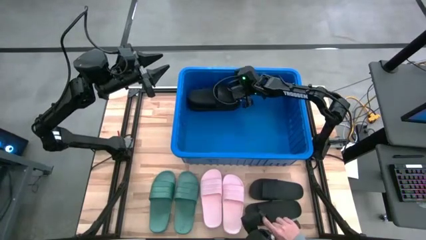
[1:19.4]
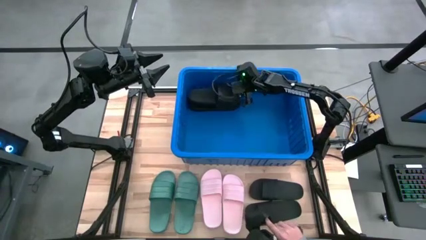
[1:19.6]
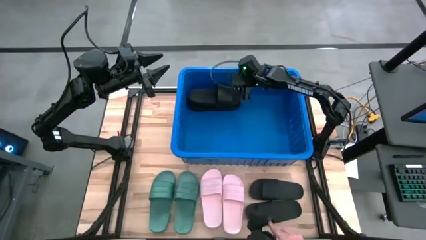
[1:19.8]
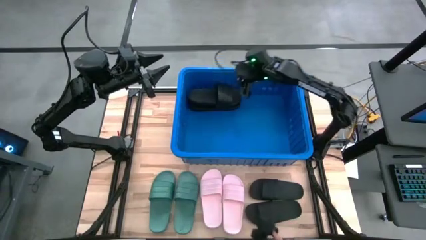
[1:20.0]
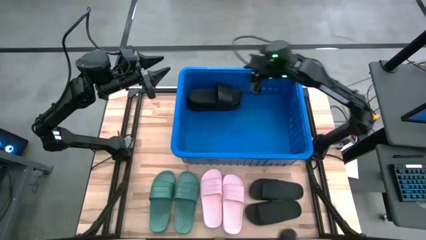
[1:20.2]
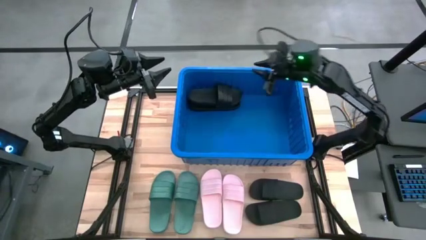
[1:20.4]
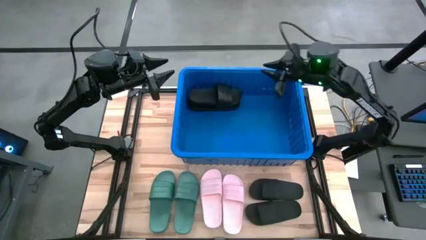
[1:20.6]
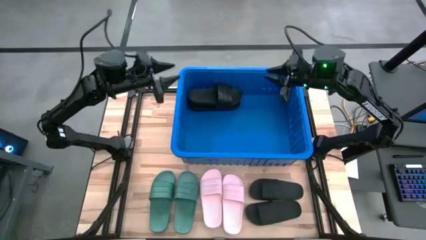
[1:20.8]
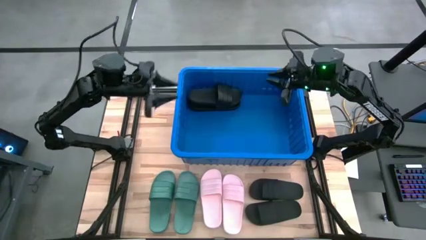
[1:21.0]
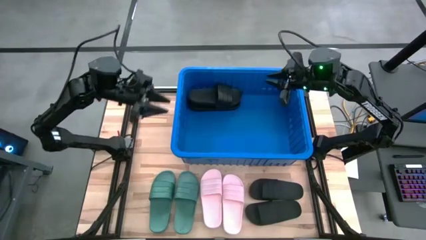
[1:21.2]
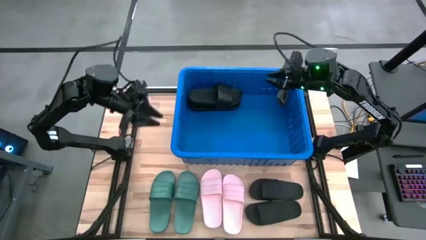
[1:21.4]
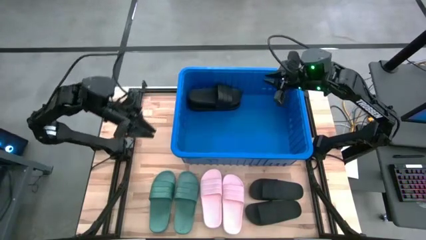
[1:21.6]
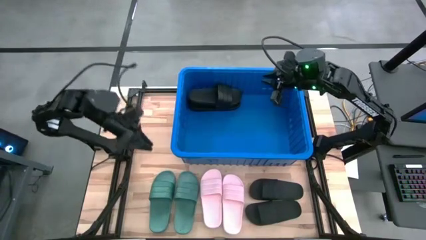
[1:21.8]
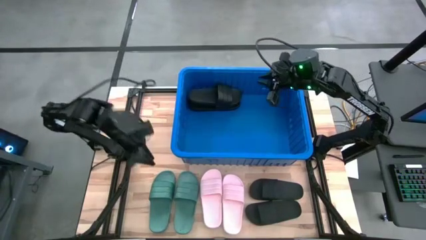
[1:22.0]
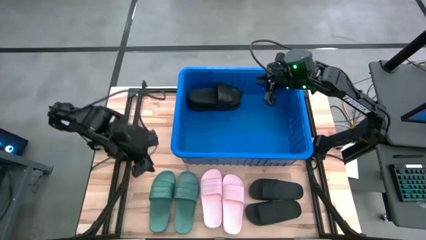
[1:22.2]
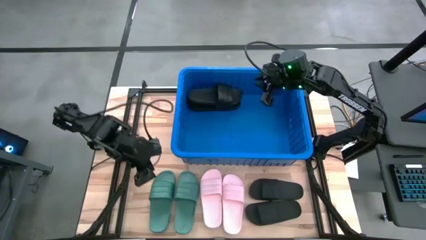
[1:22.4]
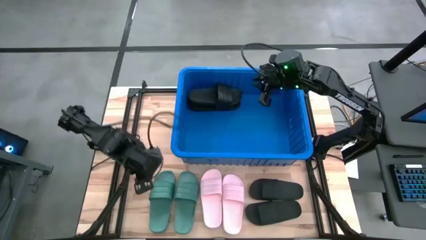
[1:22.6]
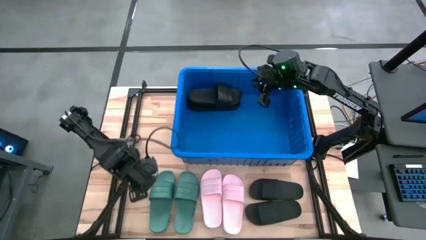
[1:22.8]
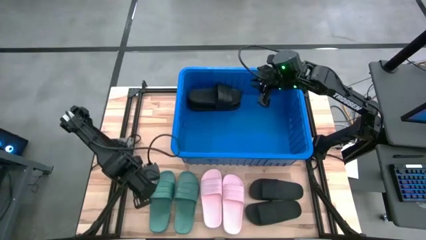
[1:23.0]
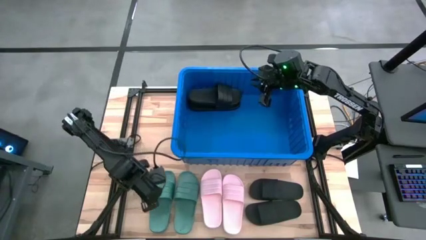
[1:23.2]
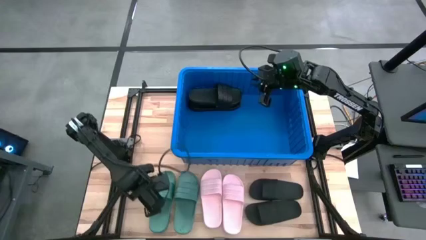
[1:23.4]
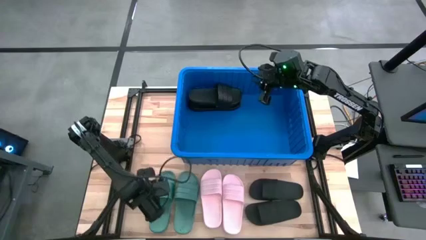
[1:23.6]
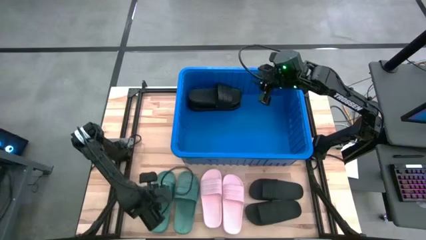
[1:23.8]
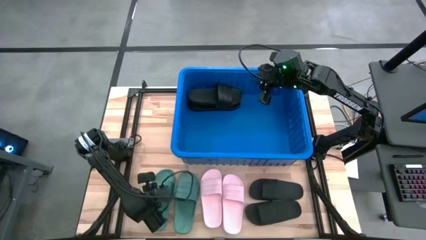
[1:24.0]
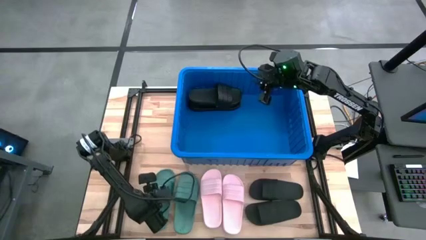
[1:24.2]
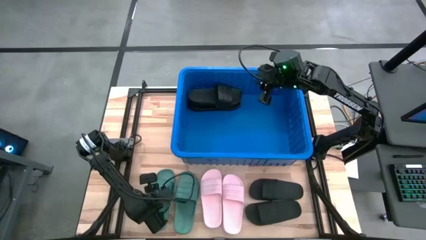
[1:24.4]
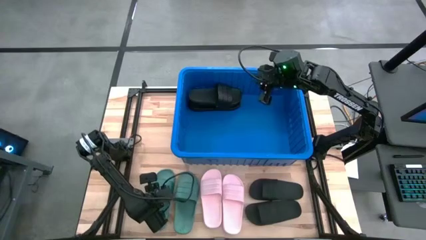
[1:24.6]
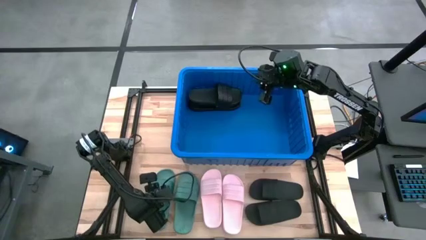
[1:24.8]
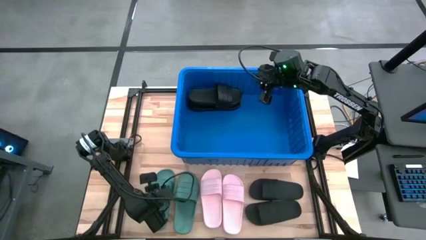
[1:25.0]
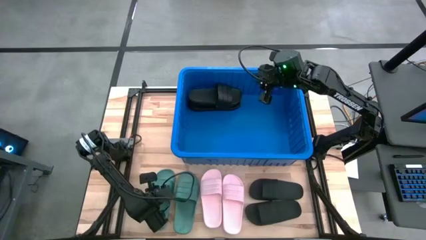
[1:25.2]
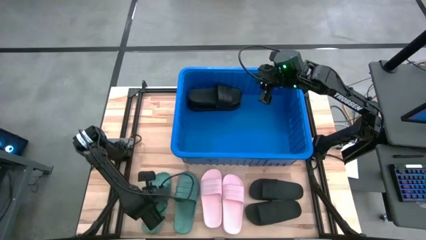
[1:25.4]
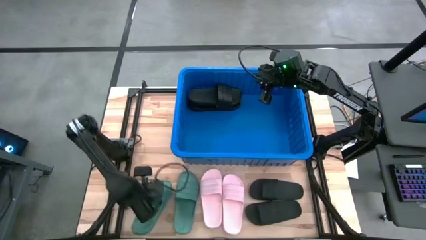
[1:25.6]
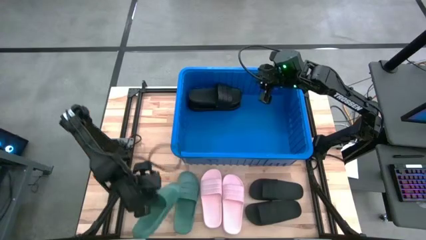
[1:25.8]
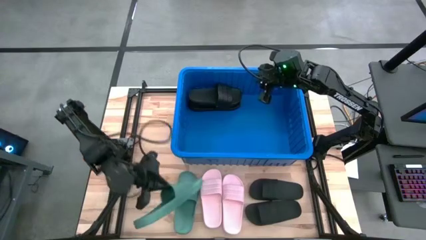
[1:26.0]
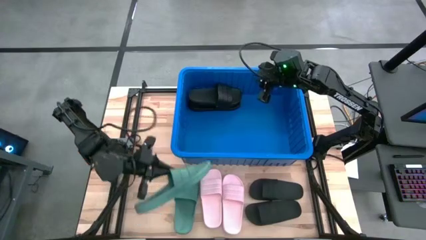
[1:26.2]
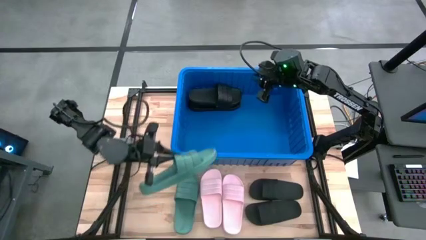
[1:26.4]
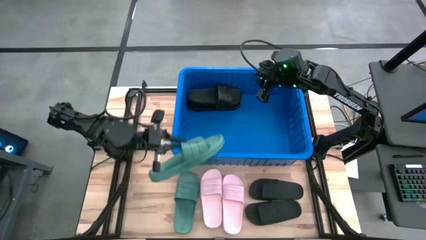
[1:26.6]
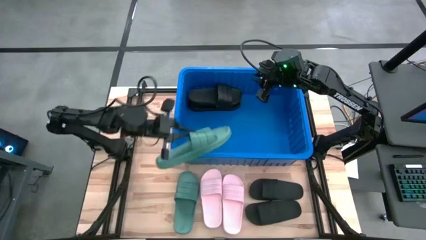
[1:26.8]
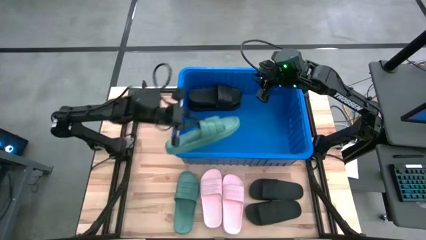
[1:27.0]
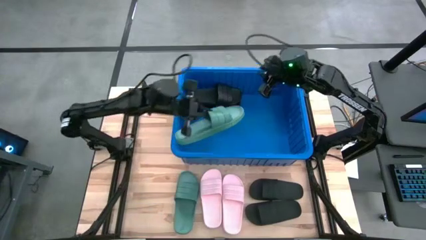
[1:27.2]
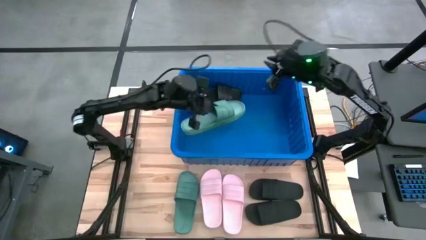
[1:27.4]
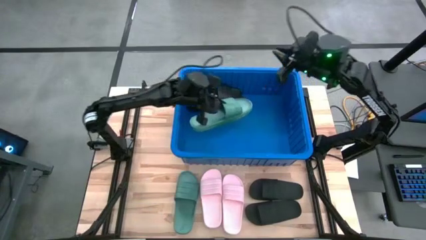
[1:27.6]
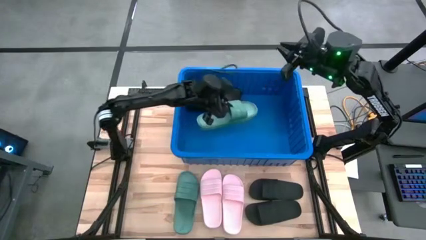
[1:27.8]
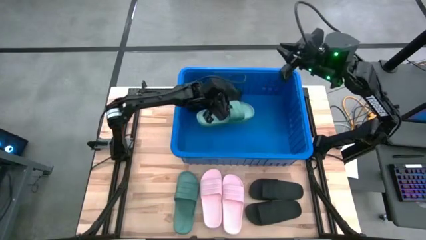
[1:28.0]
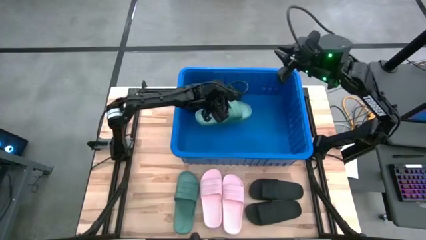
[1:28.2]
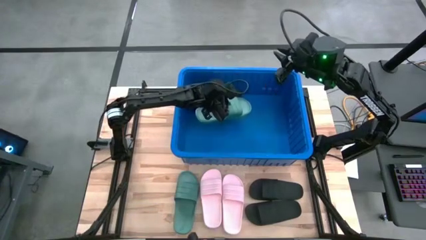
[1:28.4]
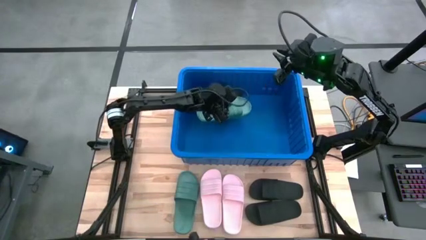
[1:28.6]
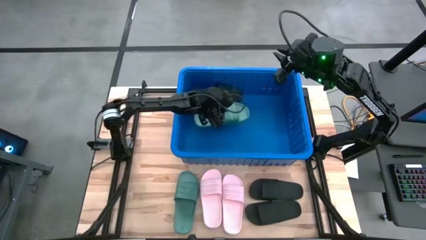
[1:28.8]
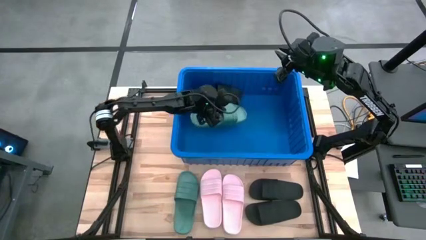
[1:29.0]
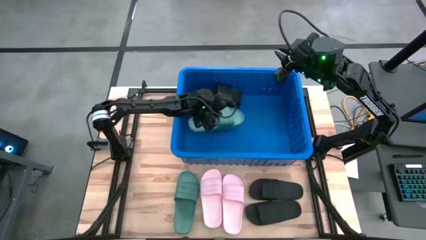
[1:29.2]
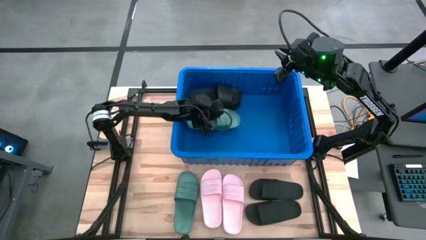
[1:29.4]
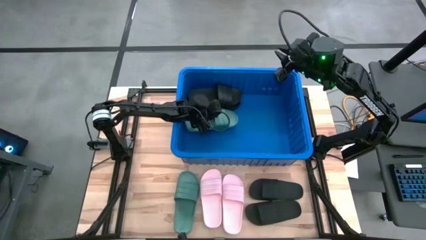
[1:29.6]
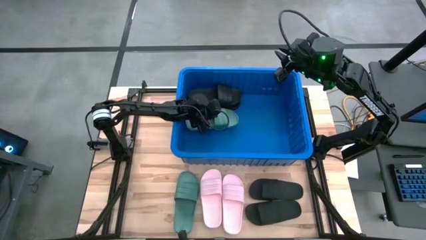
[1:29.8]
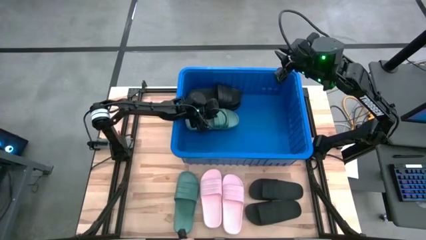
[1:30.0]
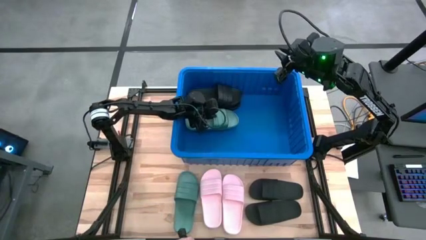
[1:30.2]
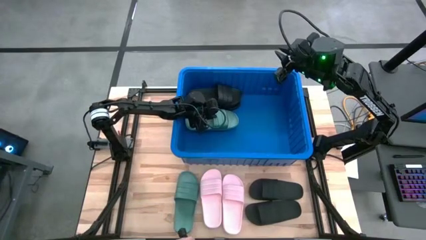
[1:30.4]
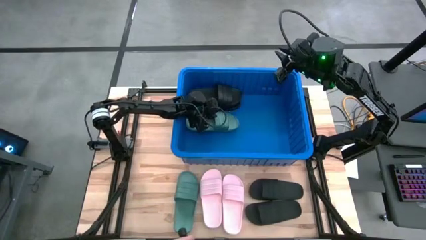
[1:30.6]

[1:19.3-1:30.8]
Task: Pick and place slides into bin
Put the green slipper into the blue bin
